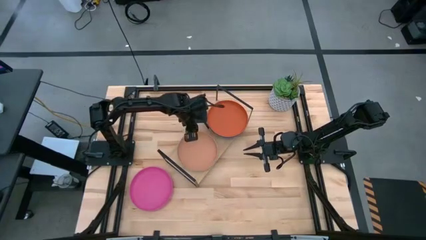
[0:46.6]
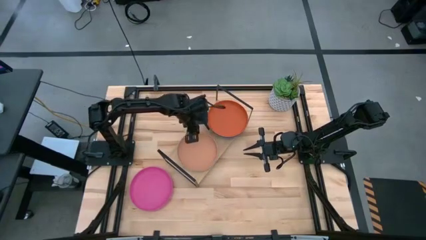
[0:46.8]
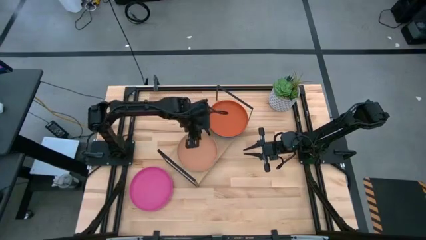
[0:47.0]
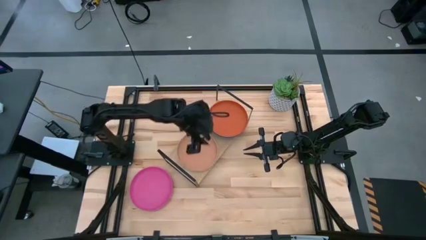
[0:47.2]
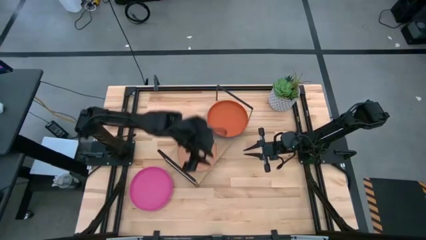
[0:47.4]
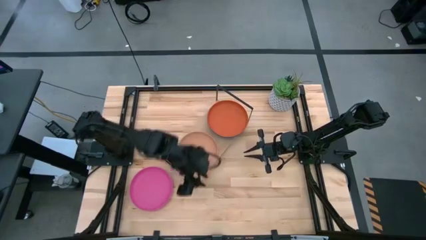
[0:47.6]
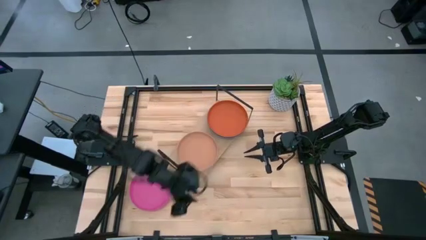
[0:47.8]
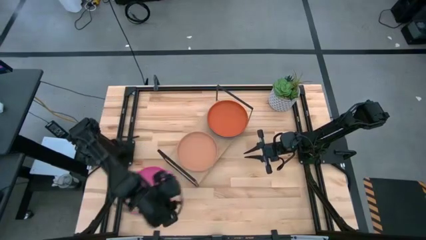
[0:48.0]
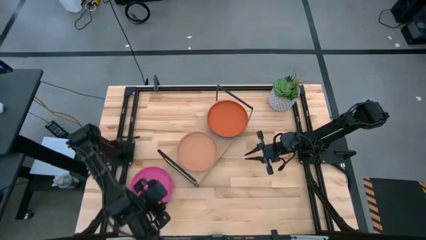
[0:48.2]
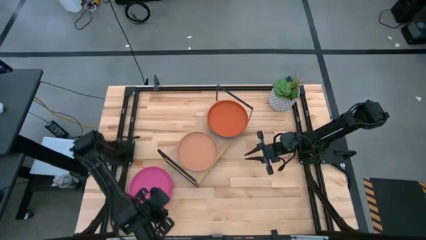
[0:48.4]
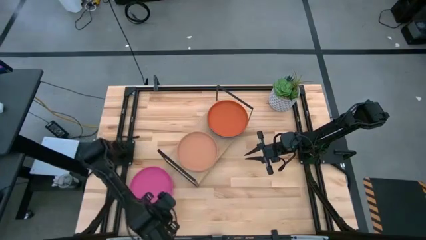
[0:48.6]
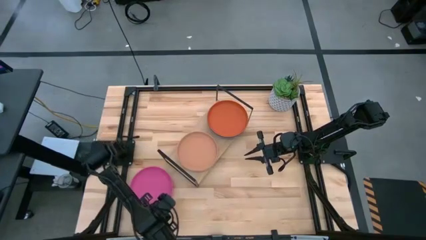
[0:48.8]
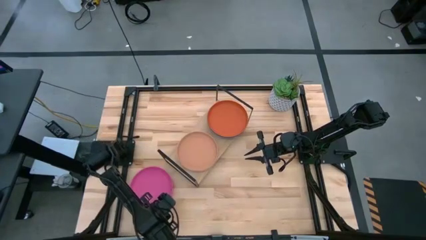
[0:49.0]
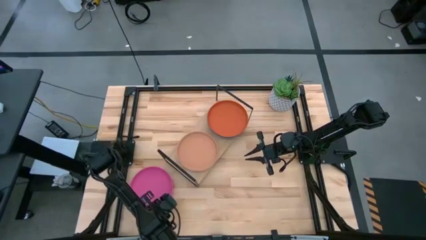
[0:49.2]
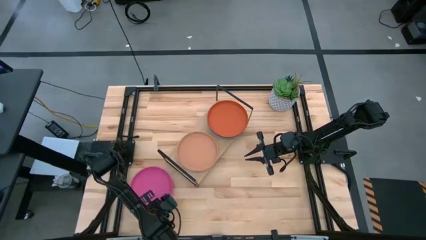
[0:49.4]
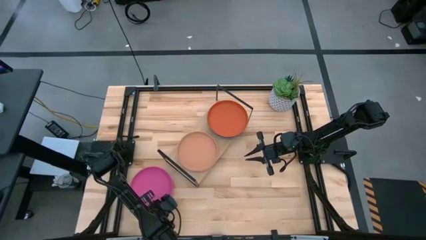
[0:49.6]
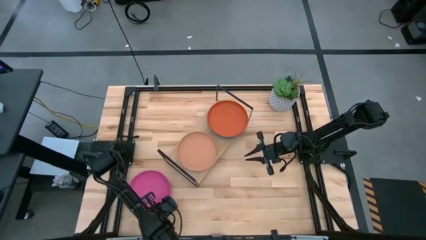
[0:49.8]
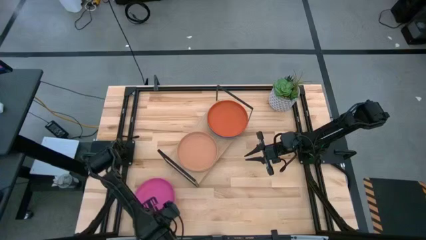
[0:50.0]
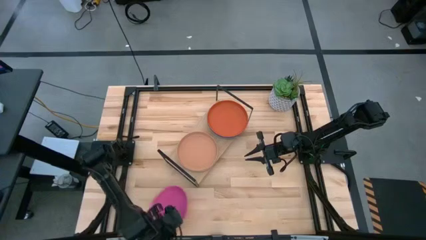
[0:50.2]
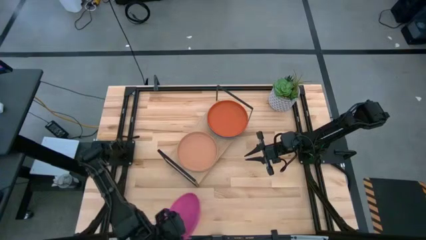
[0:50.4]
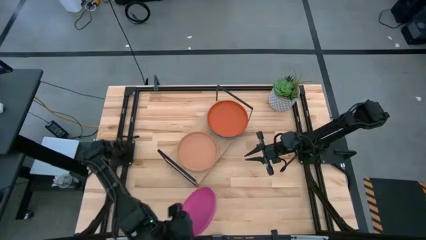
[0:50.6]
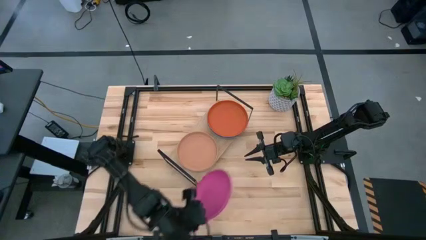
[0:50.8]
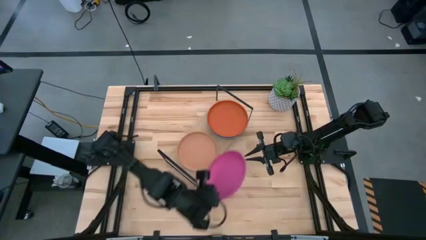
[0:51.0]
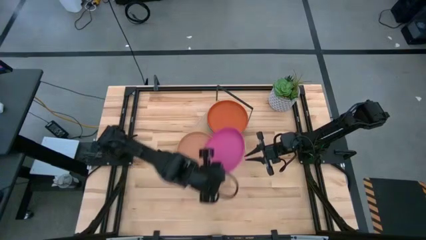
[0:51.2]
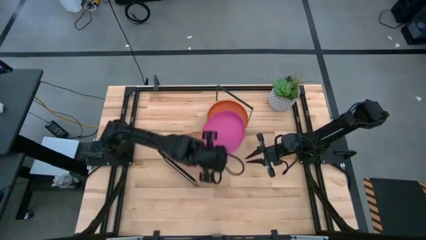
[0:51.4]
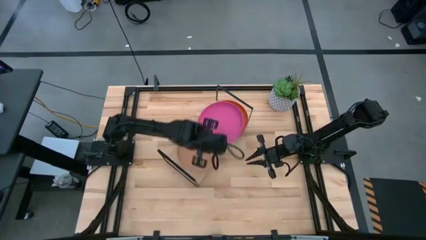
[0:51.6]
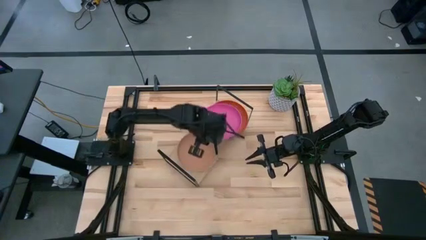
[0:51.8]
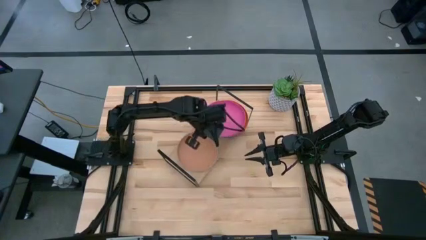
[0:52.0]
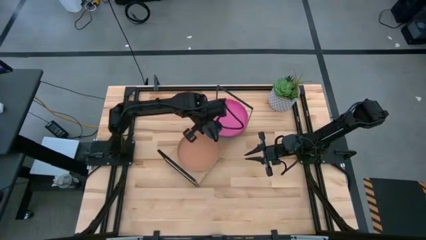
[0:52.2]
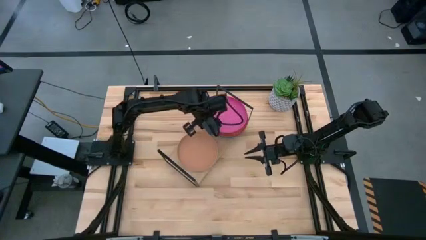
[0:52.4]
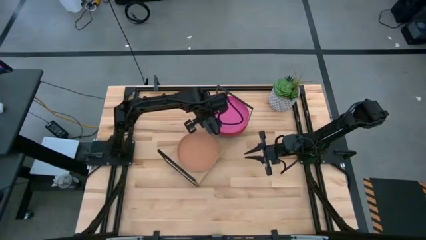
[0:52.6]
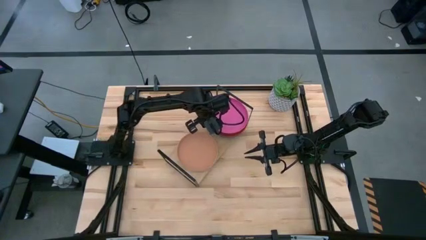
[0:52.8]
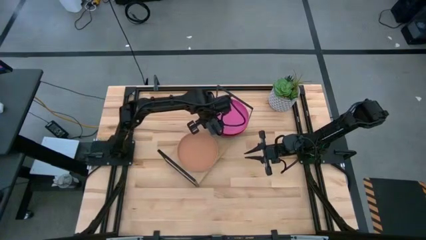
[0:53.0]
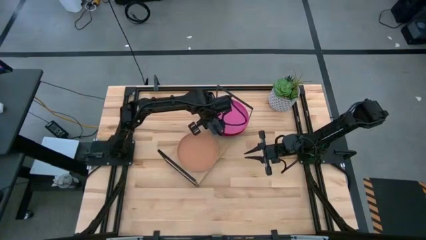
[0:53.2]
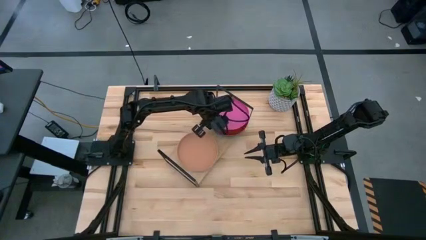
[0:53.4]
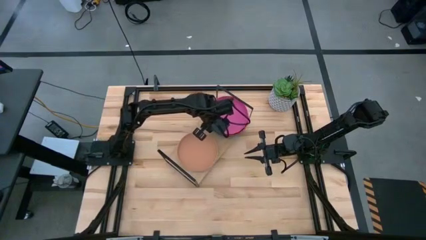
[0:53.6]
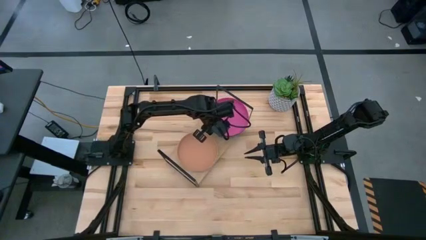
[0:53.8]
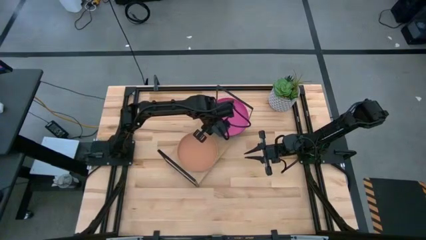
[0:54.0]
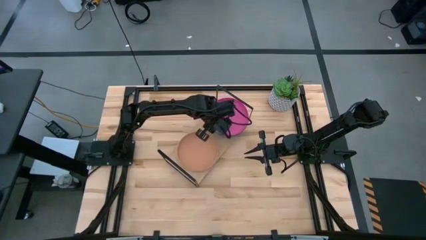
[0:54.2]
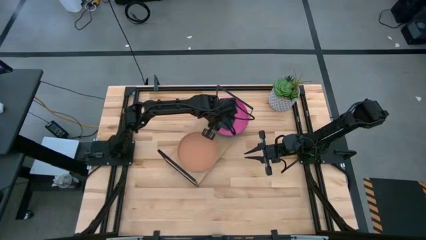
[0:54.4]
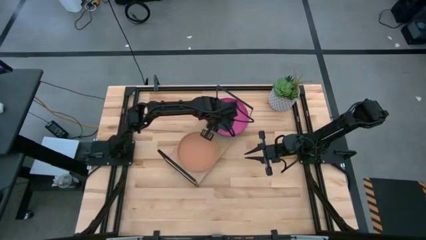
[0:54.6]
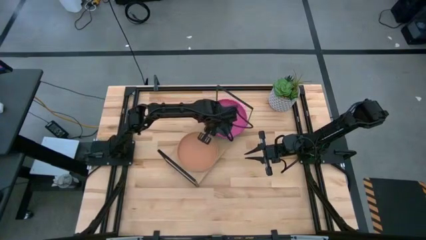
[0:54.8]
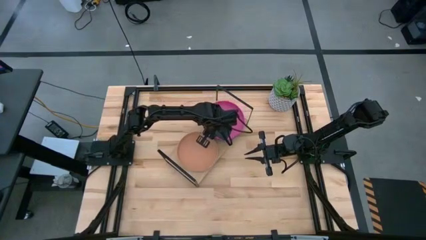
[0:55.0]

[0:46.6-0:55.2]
Task: Place and stack plates onto a shelf
Stack the pink plate on top of the orange plate on the shelf

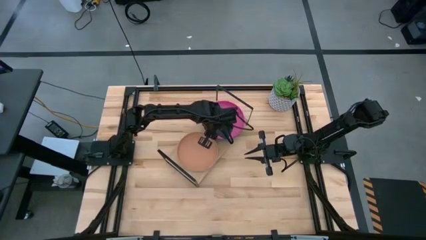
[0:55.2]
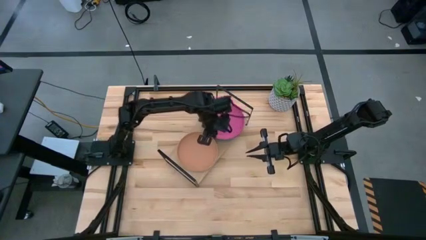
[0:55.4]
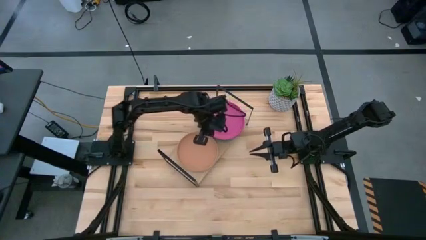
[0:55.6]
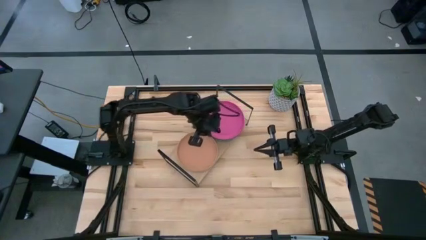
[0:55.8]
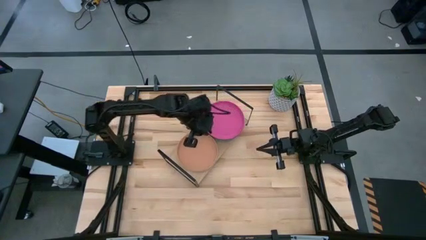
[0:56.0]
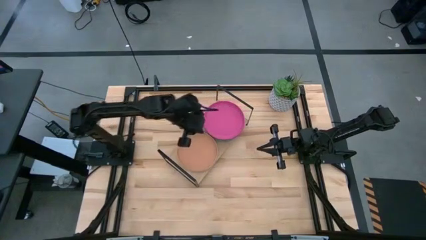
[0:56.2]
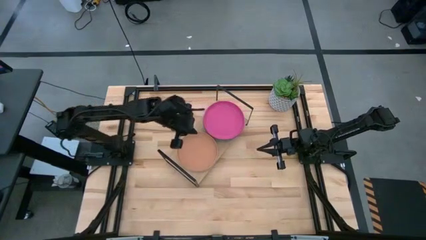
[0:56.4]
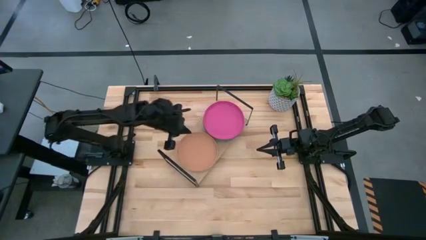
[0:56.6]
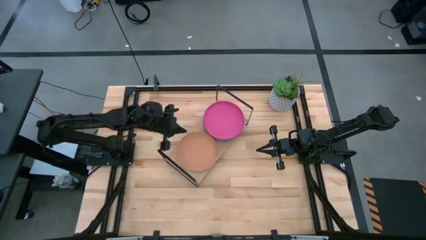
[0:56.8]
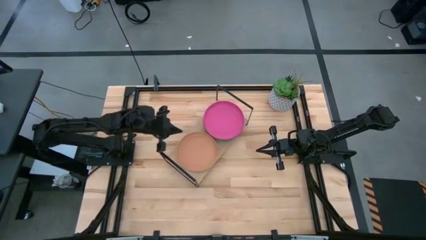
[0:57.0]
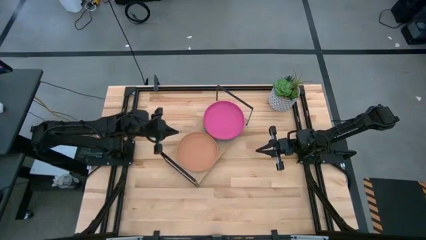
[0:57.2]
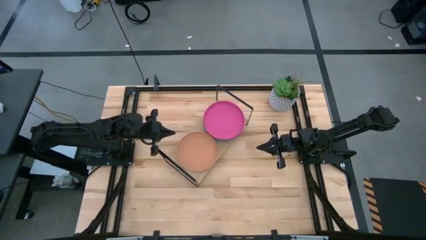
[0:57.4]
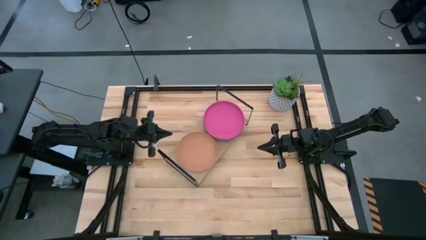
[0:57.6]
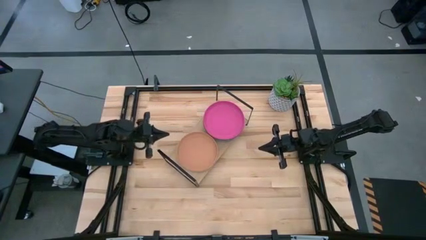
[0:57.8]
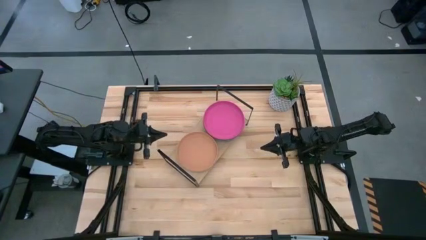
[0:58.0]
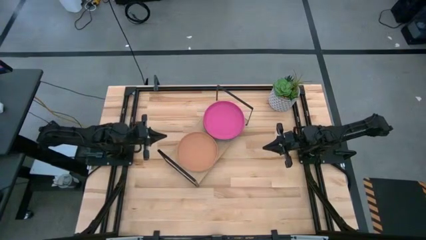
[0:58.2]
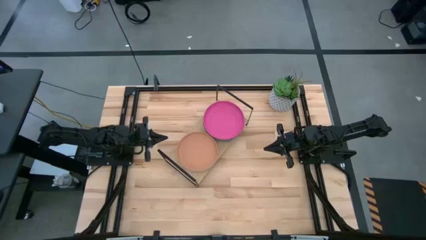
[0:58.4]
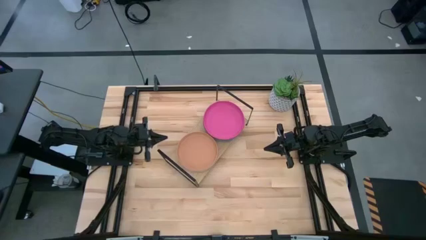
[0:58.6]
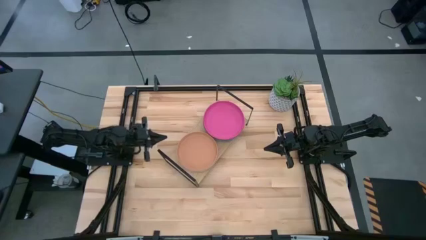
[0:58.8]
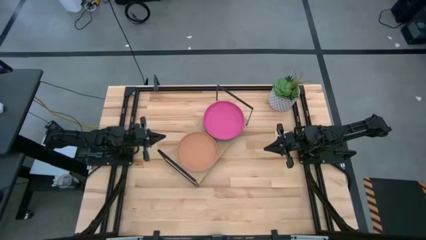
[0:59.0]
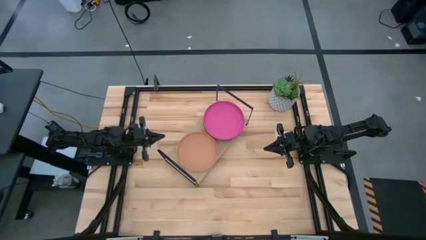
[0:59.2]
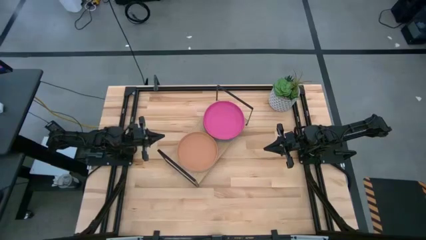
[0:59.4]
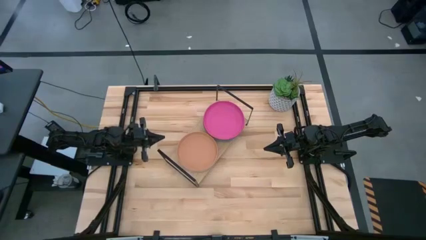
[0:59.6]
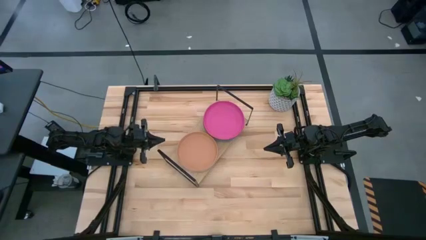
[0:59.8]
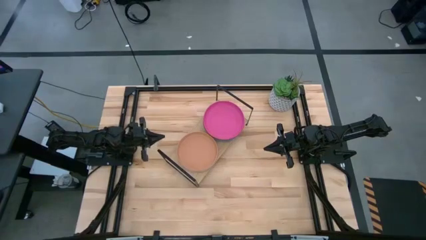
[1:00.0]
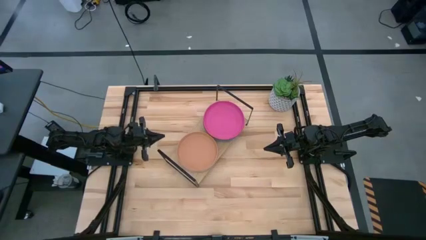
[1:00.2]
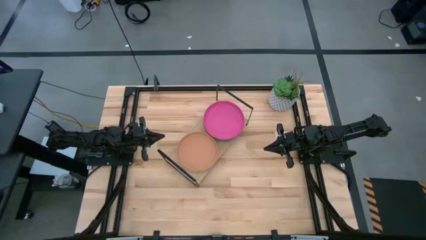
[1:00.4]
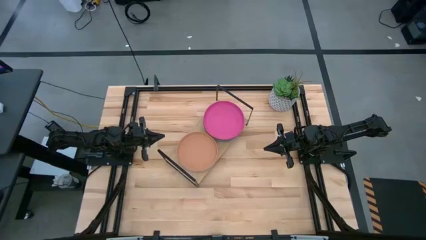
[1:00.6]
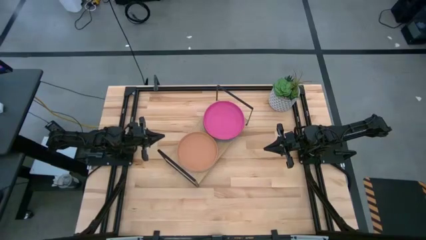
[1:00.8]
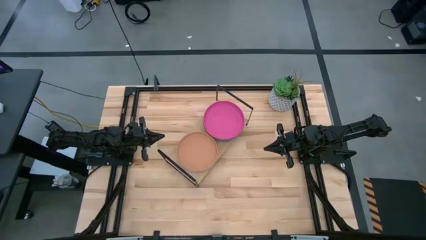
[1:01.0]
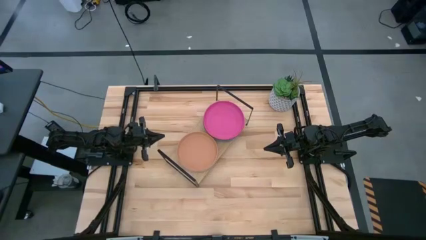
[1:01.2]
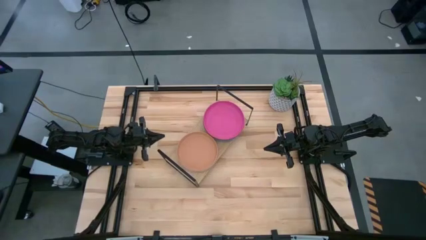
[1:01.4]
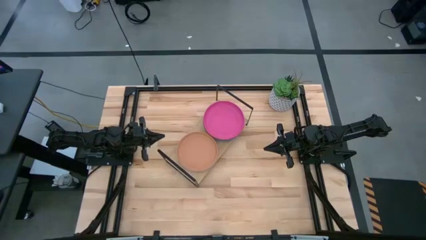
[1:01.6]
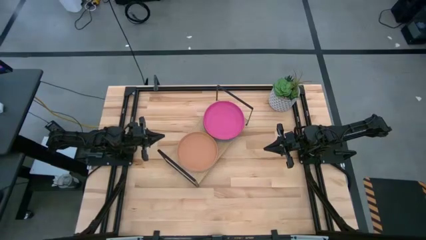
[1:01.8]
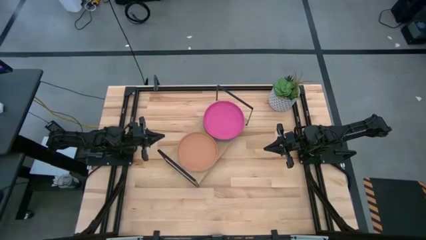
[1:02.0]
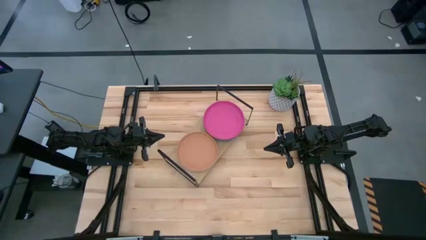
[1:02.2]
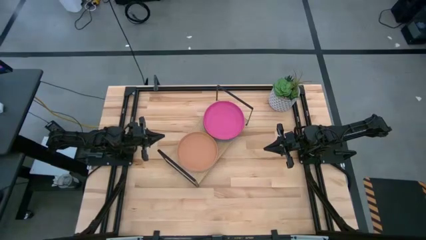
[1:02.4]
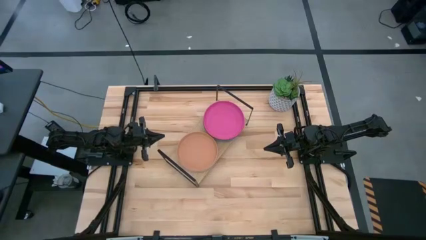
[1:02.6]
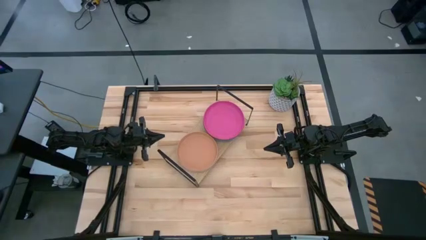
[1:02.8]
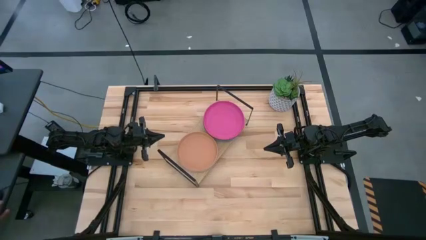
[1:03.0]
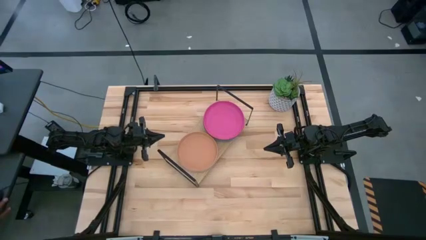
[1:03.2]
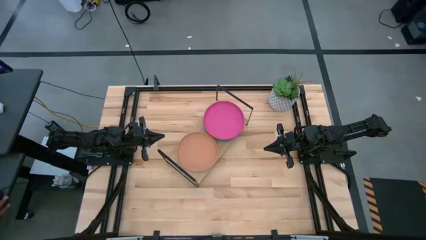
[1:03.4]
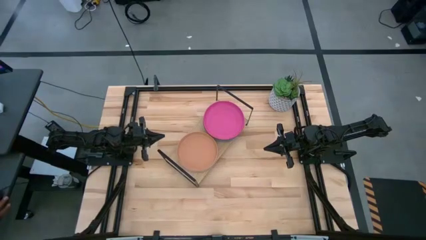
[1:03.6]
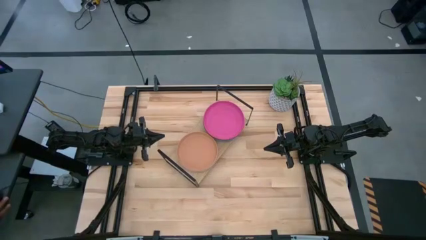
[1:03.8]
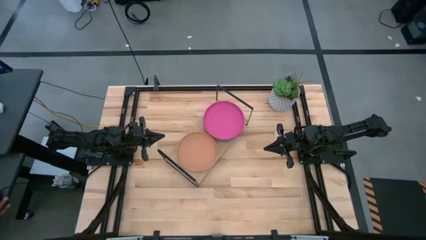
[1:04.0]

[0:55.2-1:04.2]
Return to Home Position
